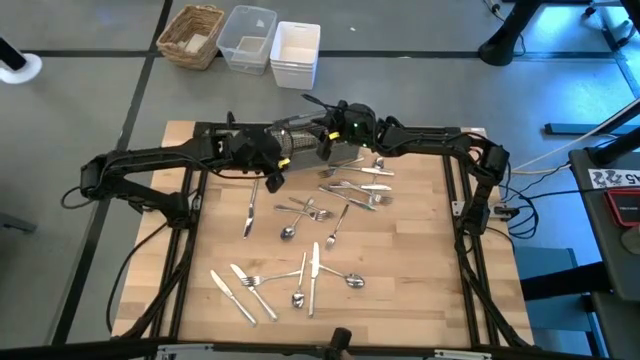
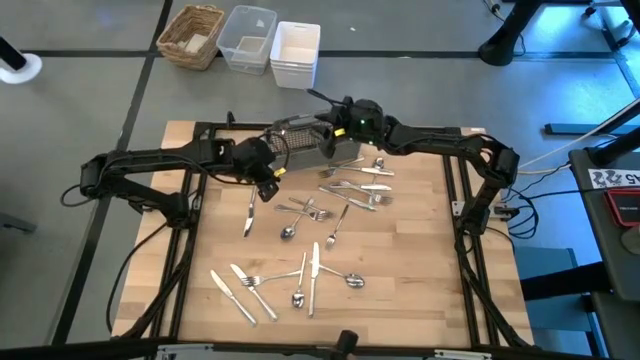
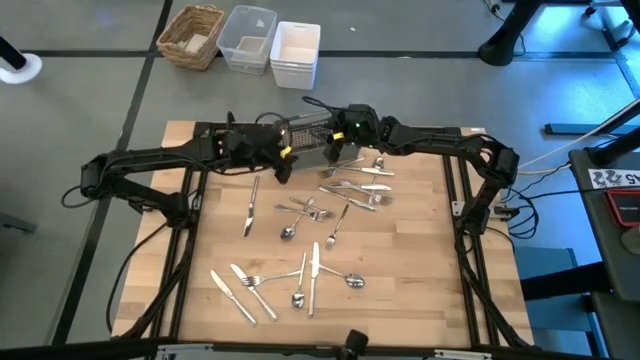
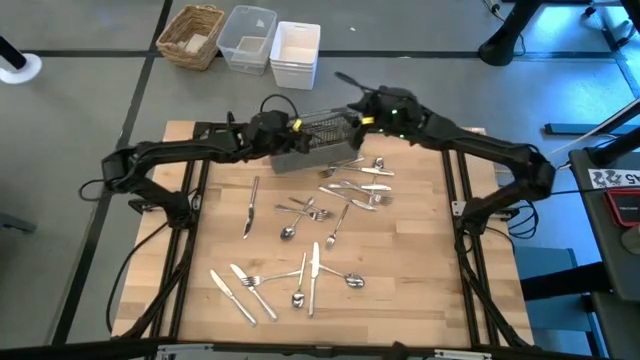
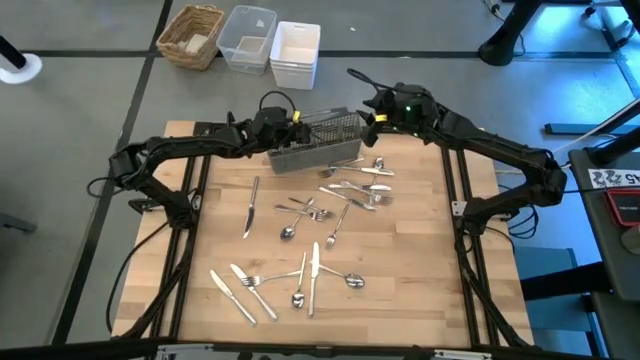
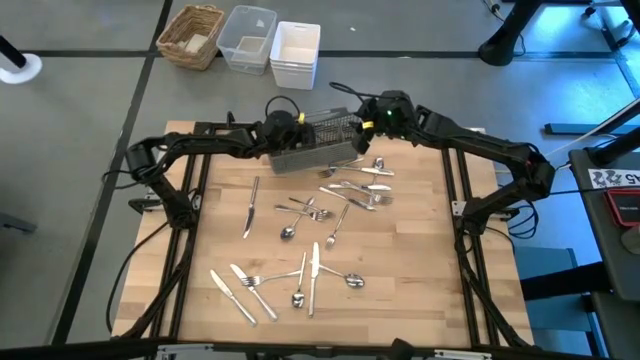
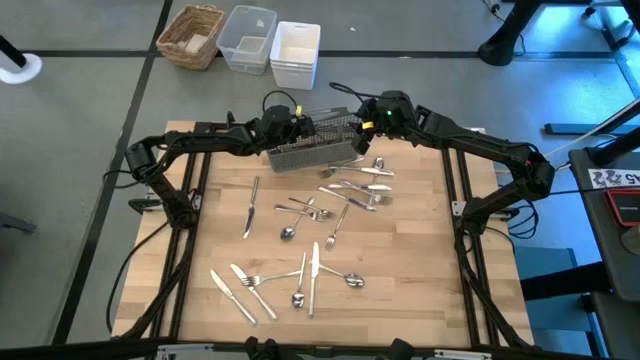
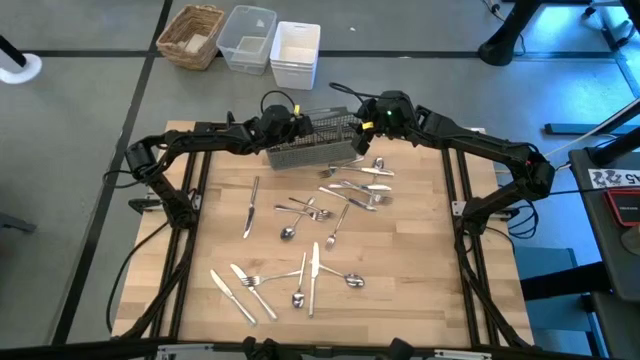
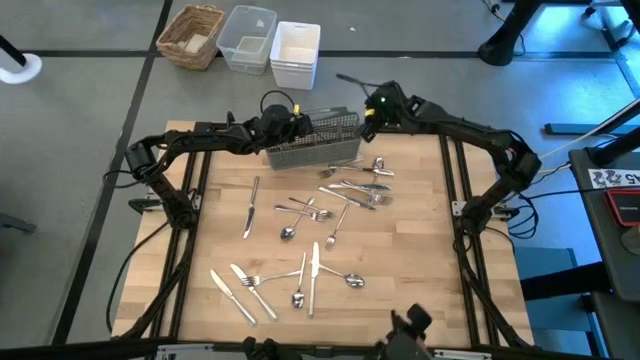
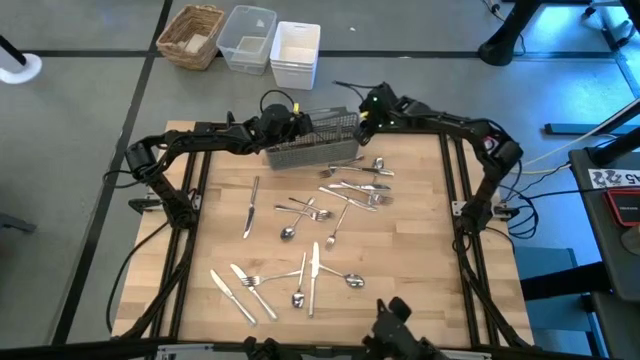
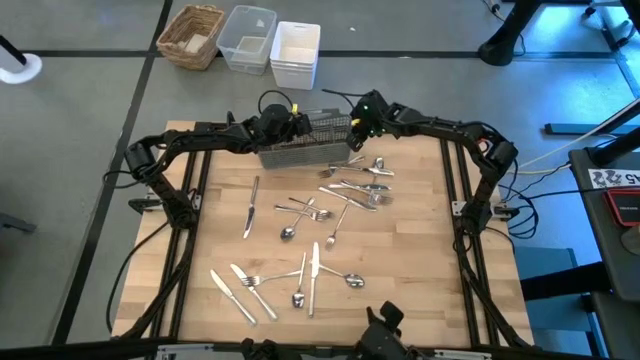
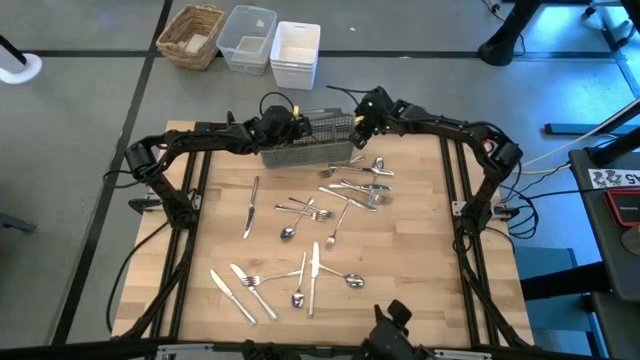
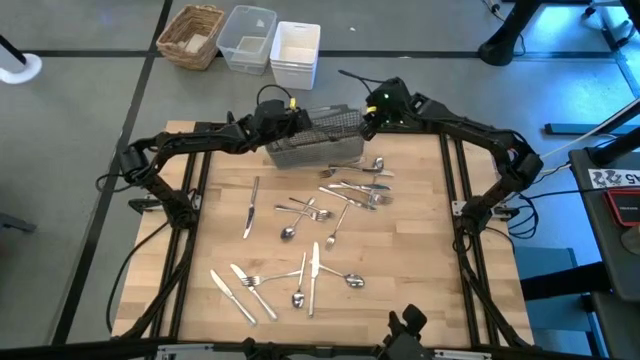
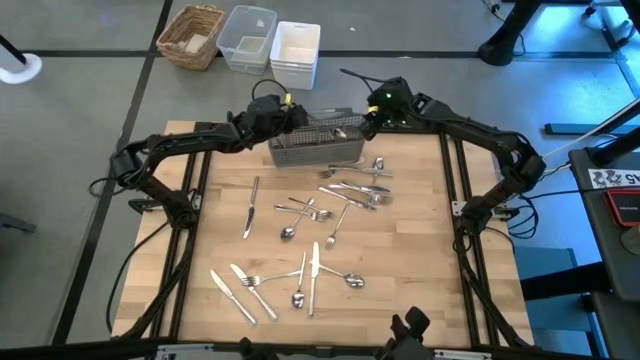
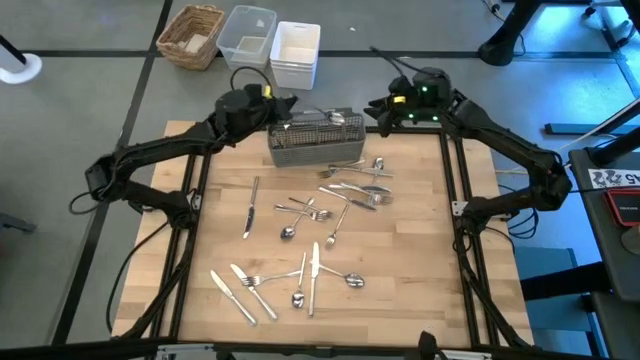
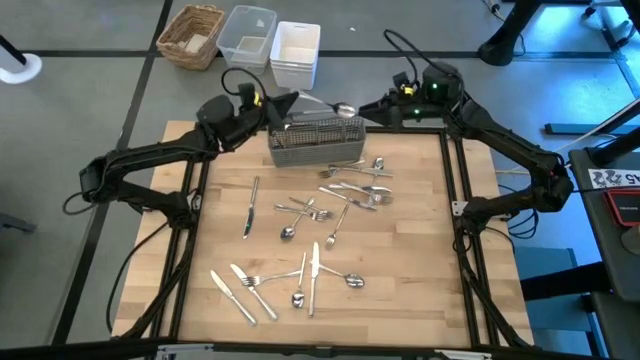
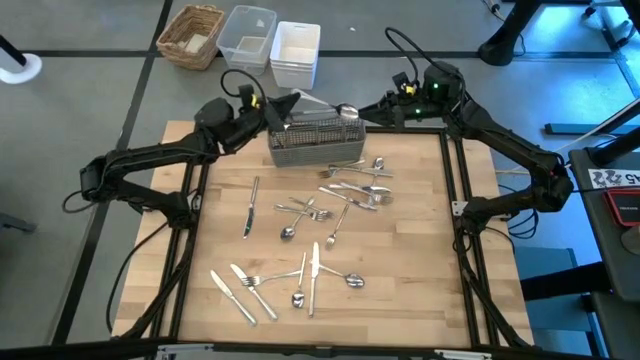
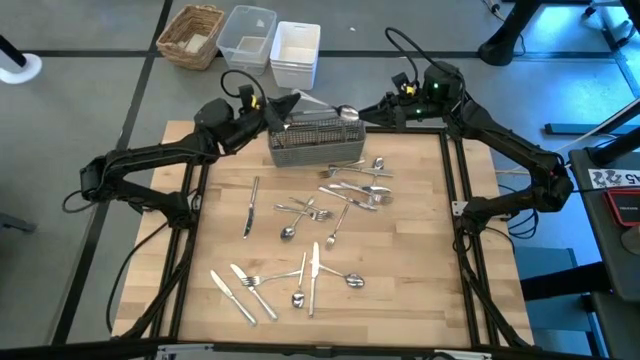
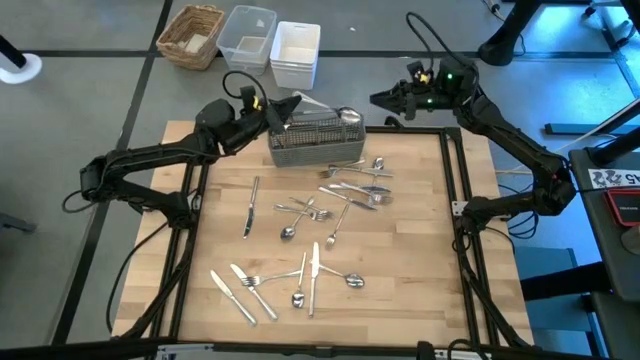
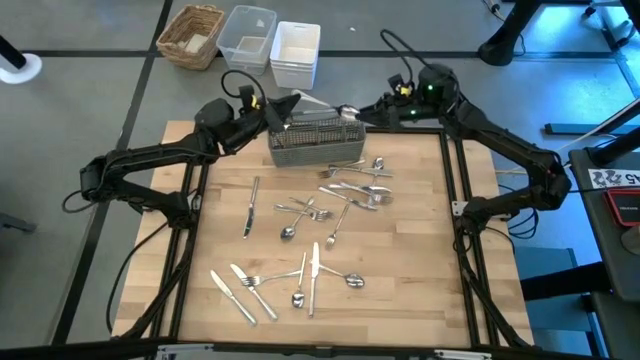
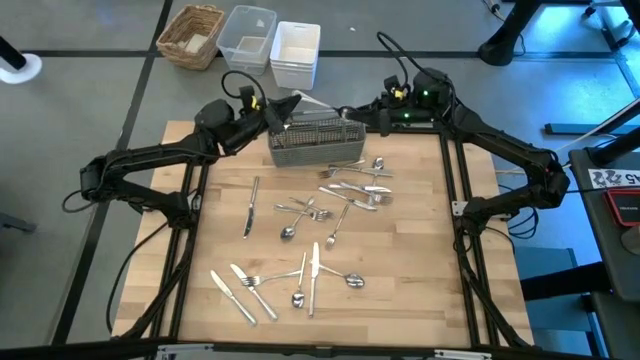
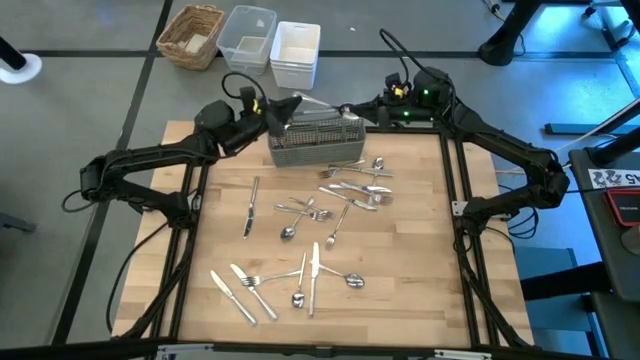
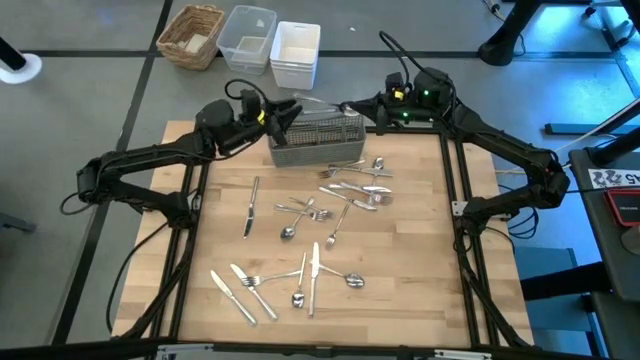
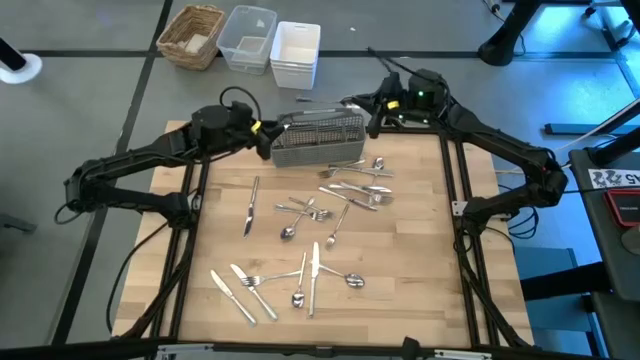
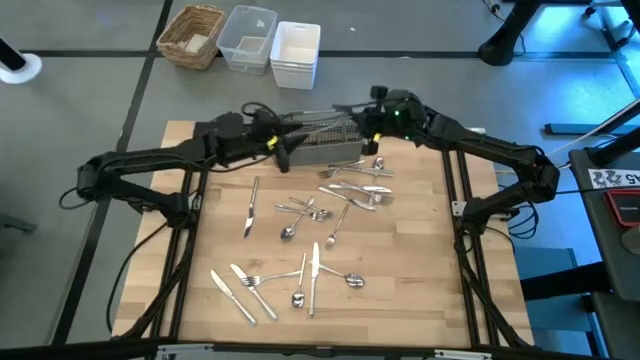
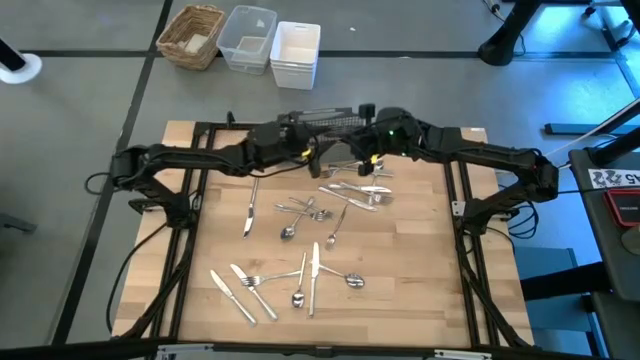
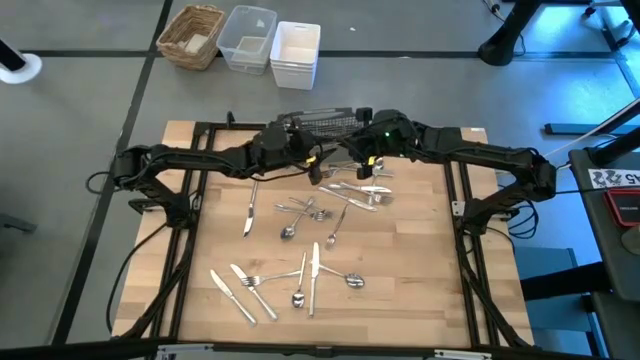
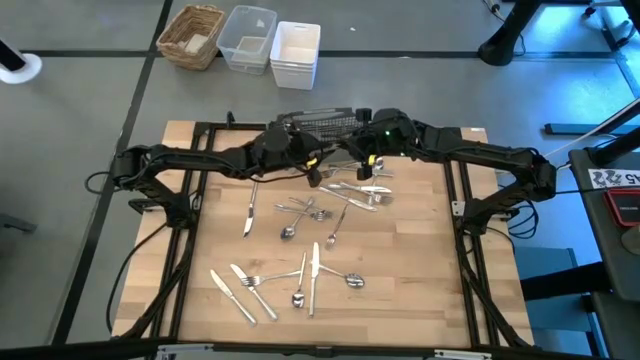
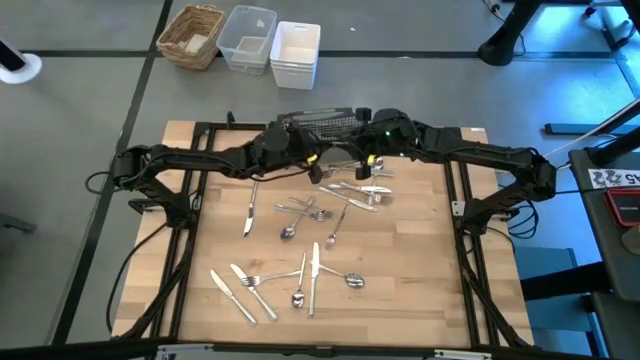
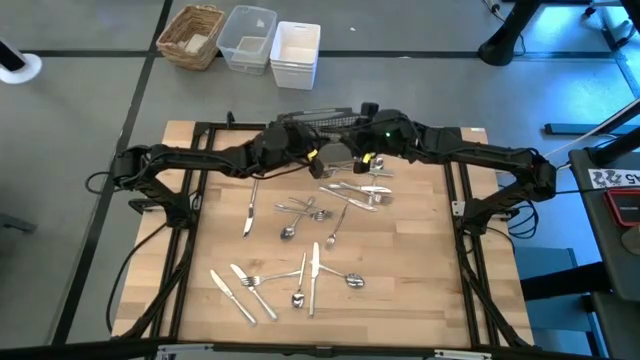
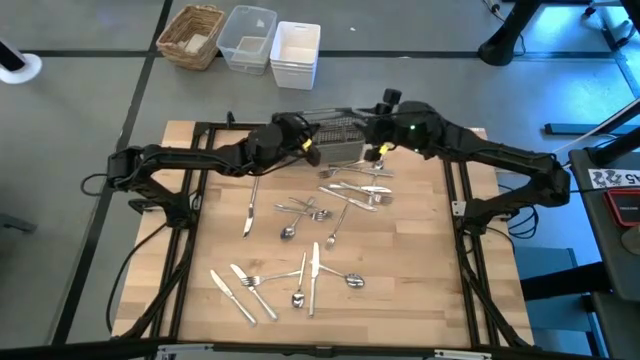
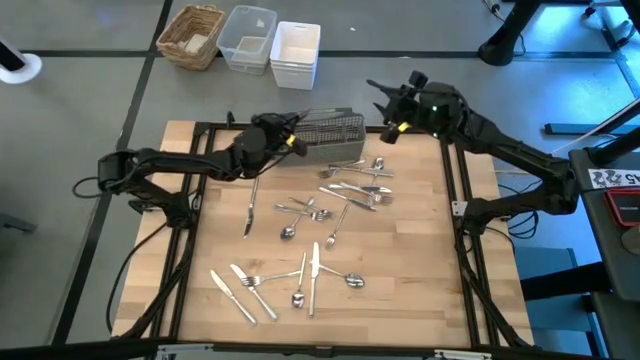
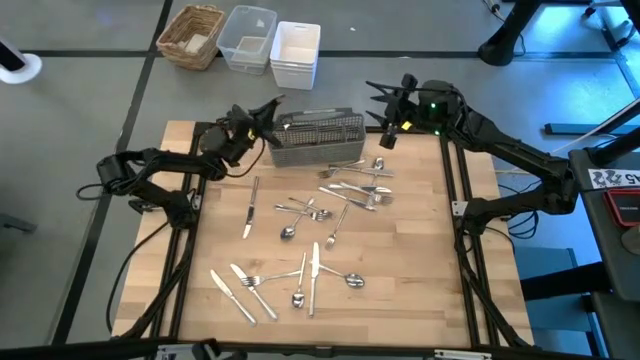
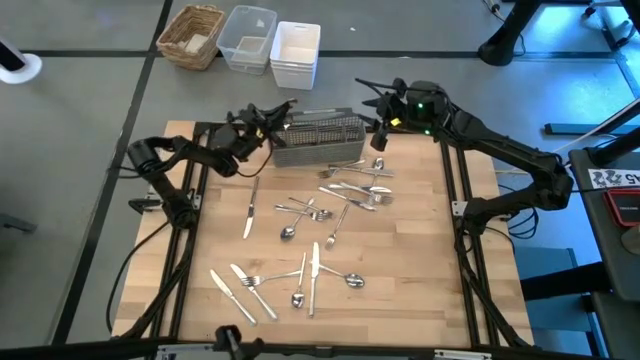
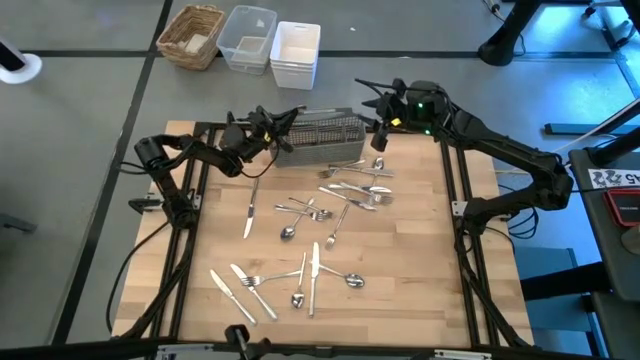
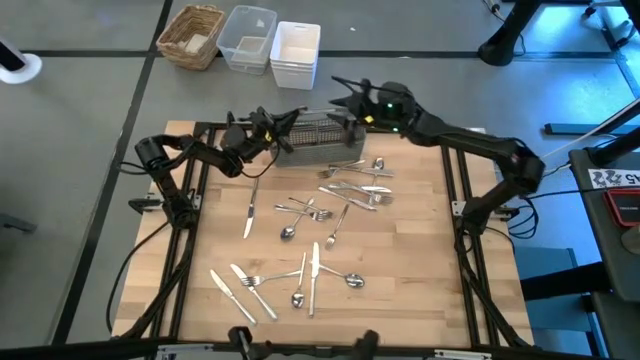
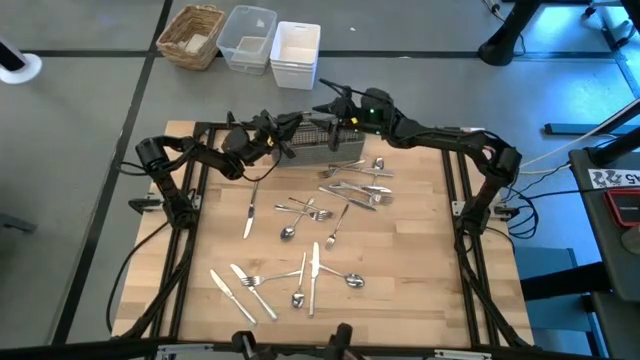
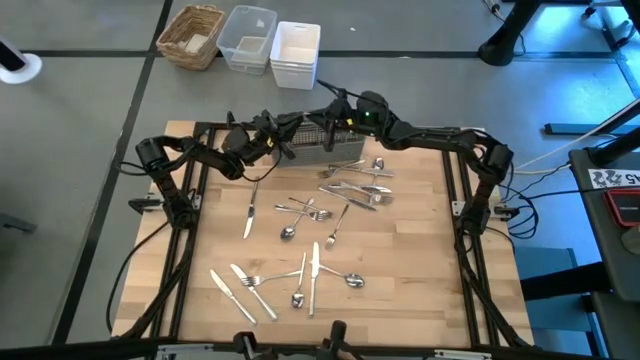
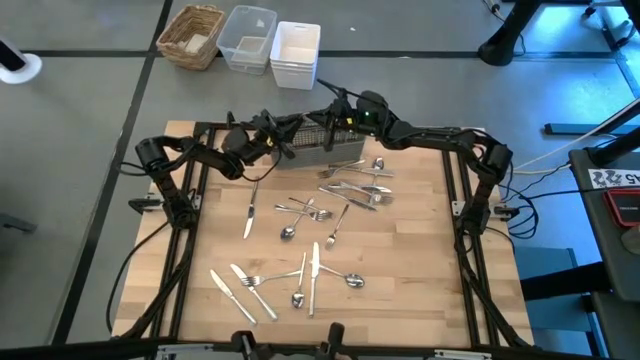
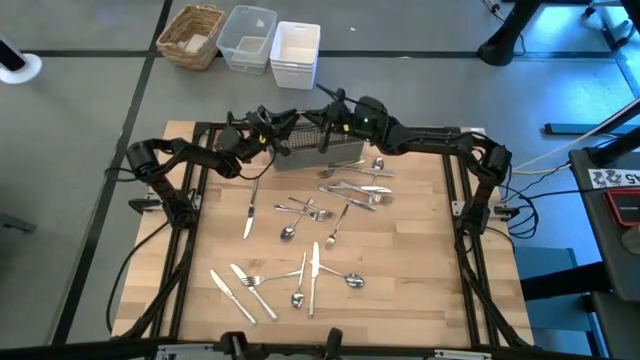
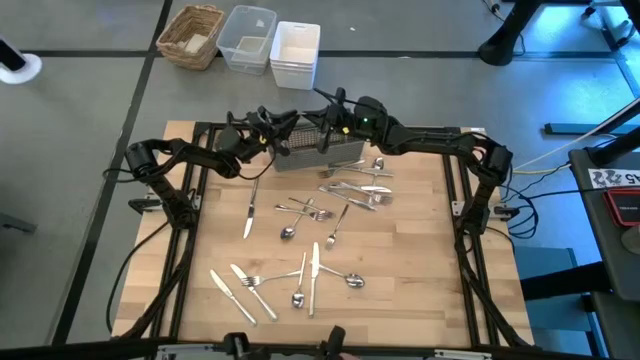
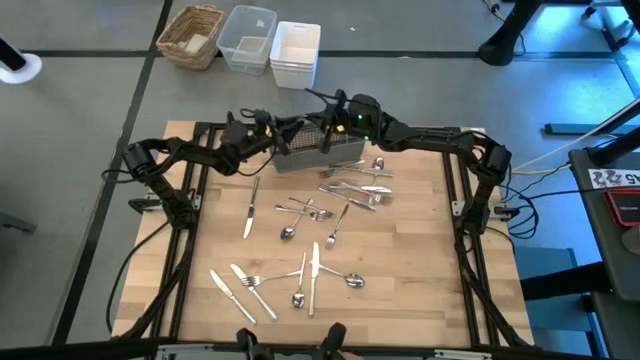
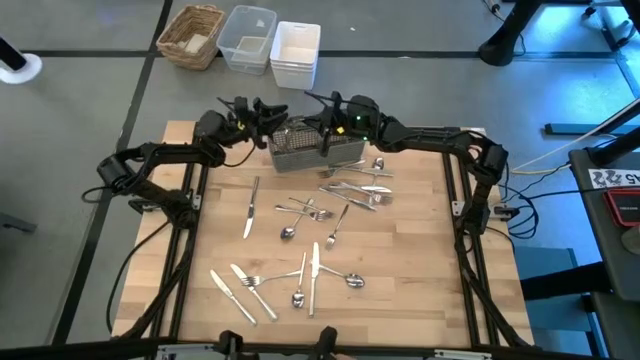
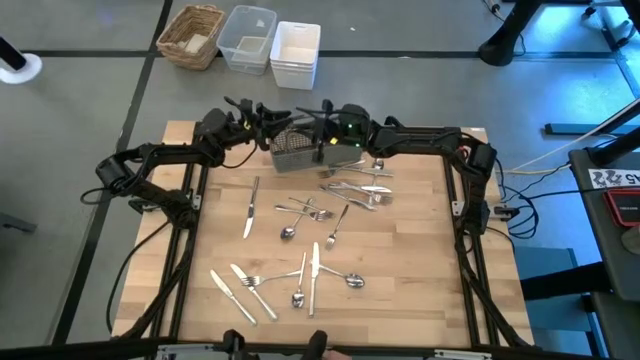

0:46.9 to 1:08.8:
Task: Sort silverware
Put the silver spoon into the silverware rack
